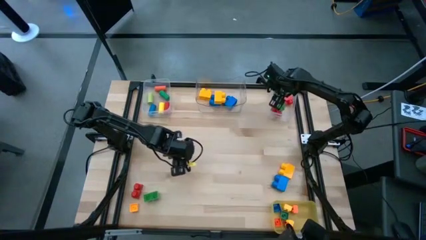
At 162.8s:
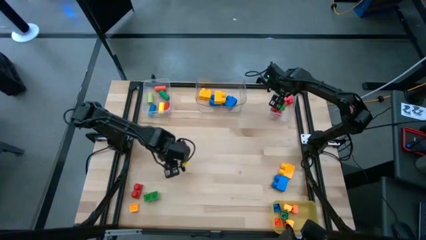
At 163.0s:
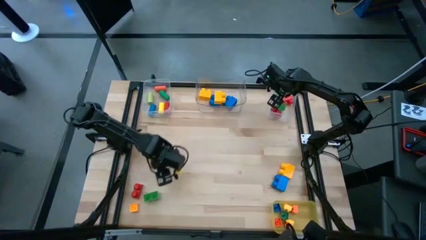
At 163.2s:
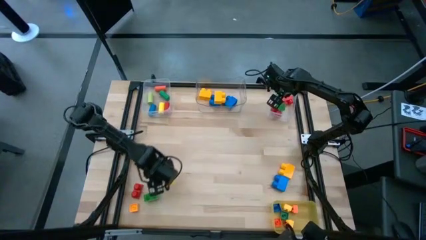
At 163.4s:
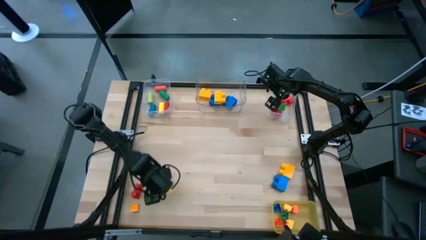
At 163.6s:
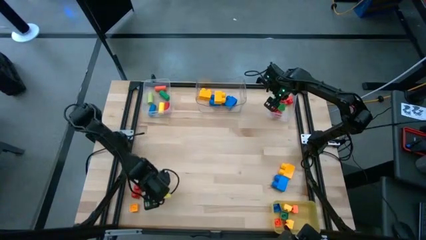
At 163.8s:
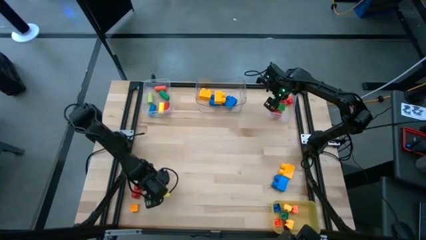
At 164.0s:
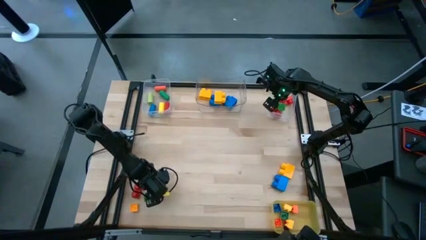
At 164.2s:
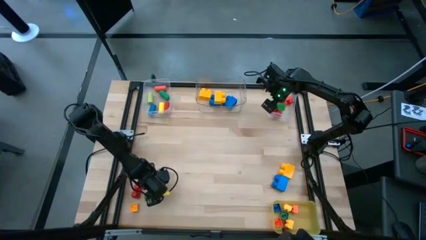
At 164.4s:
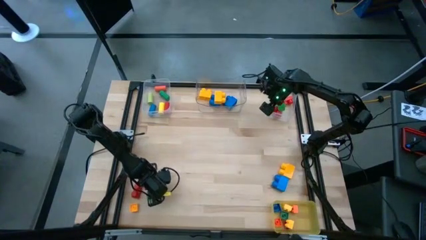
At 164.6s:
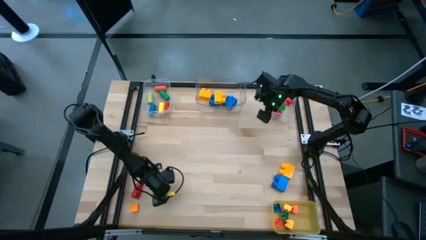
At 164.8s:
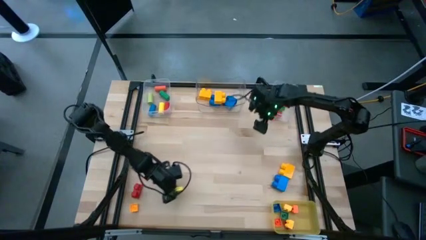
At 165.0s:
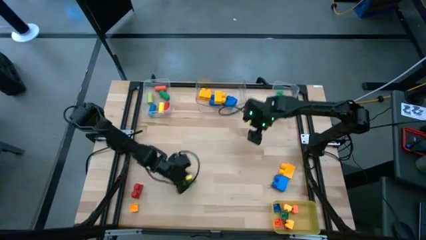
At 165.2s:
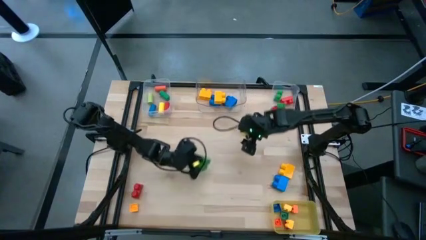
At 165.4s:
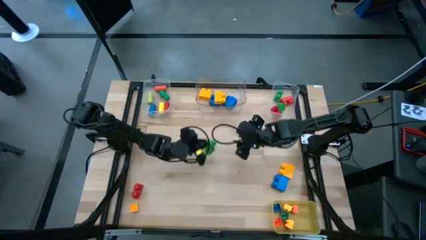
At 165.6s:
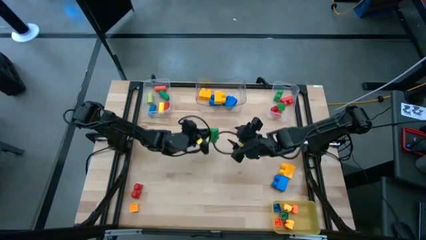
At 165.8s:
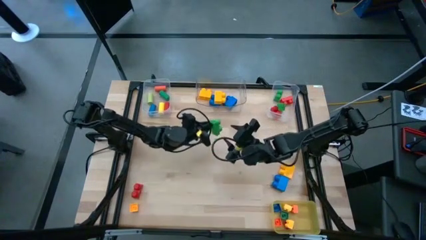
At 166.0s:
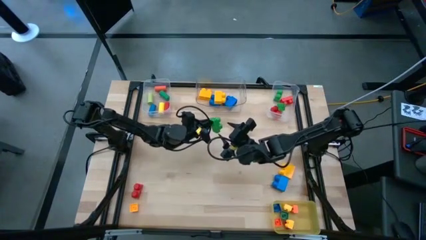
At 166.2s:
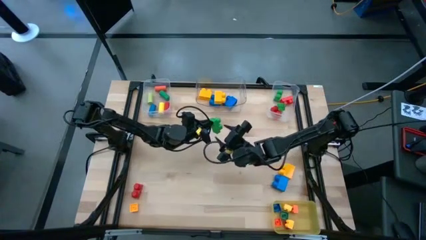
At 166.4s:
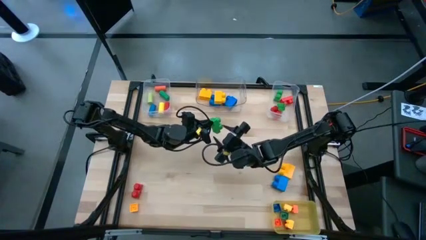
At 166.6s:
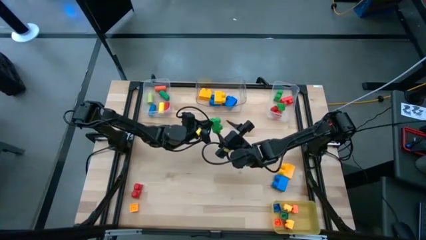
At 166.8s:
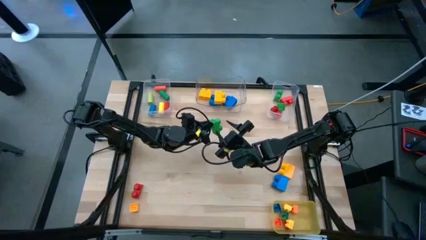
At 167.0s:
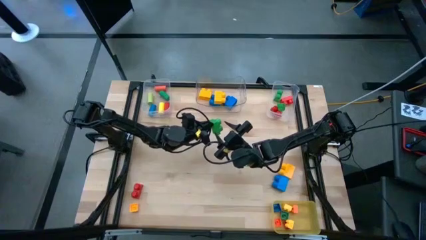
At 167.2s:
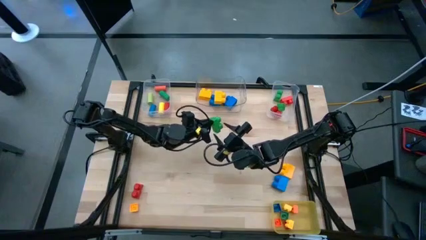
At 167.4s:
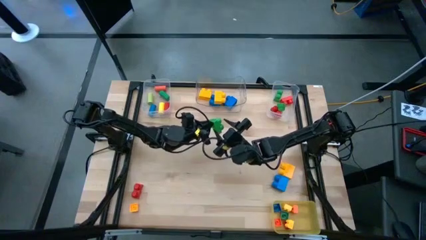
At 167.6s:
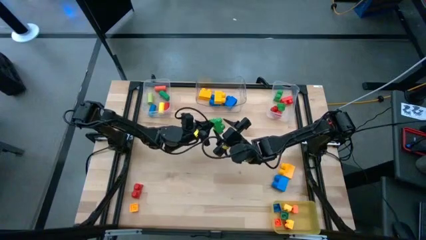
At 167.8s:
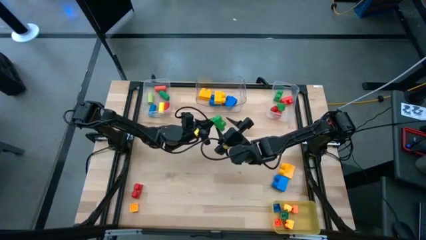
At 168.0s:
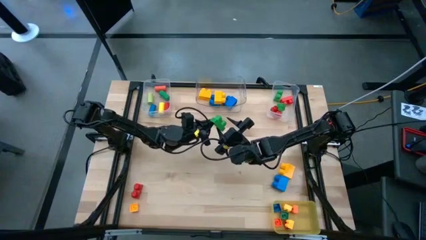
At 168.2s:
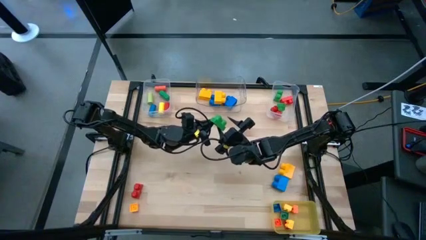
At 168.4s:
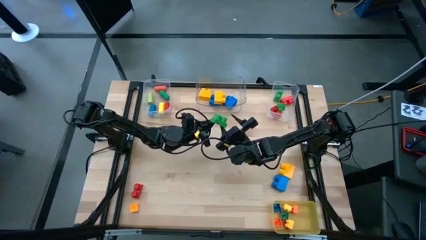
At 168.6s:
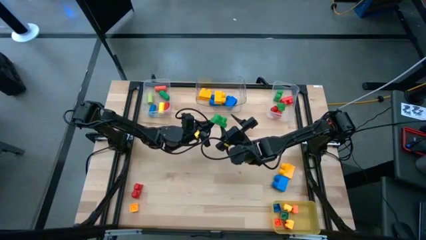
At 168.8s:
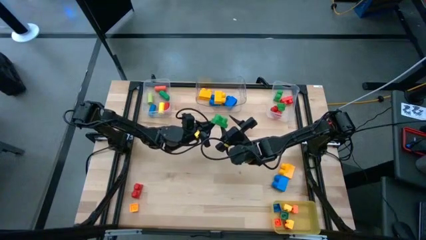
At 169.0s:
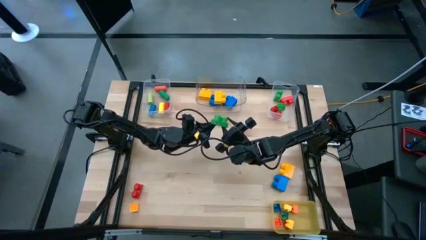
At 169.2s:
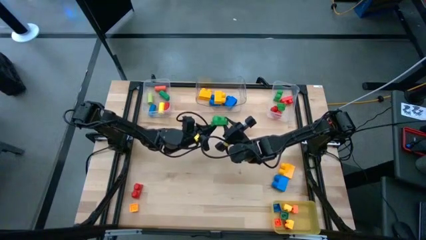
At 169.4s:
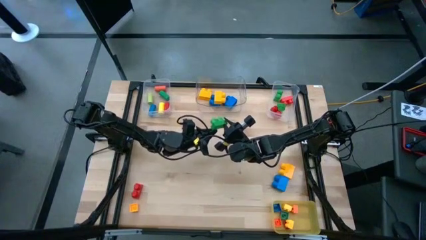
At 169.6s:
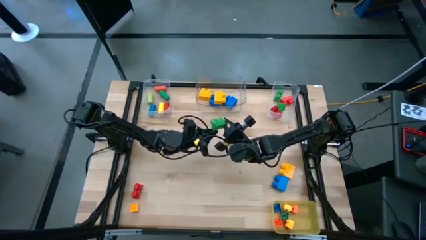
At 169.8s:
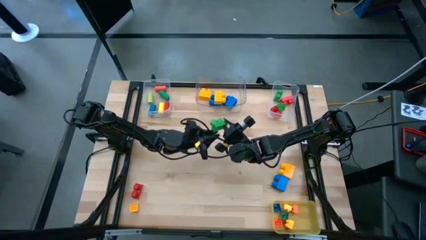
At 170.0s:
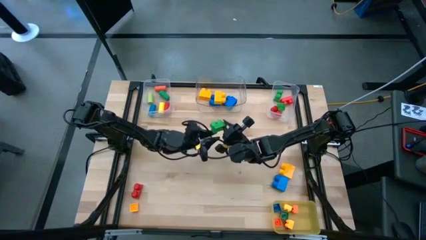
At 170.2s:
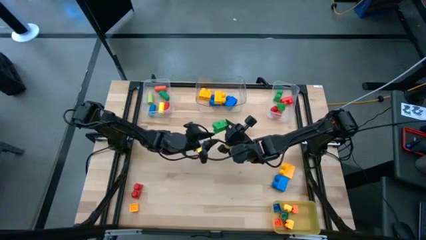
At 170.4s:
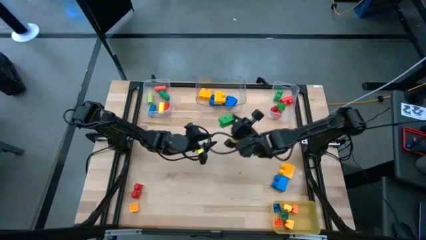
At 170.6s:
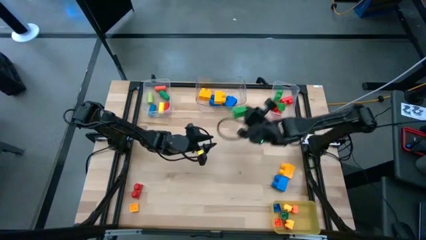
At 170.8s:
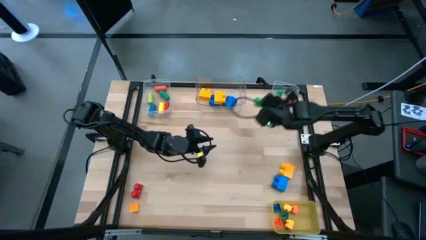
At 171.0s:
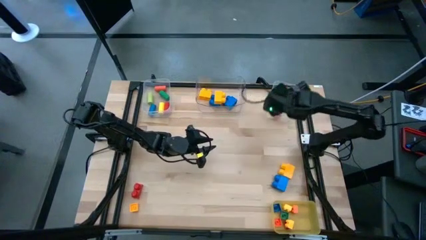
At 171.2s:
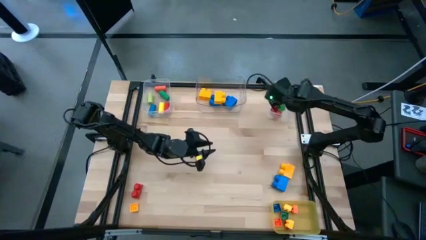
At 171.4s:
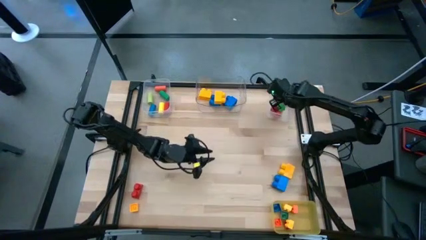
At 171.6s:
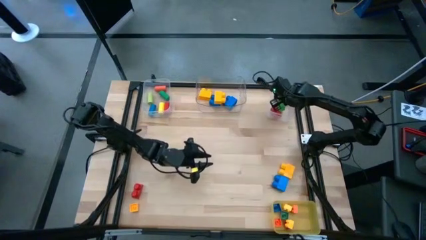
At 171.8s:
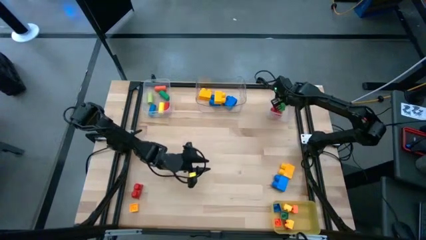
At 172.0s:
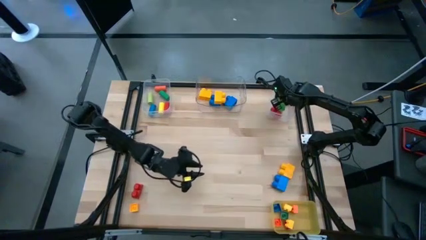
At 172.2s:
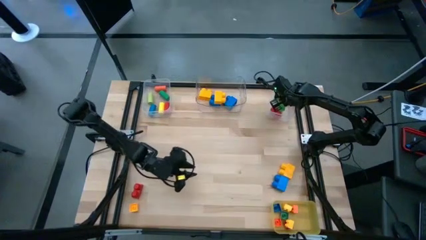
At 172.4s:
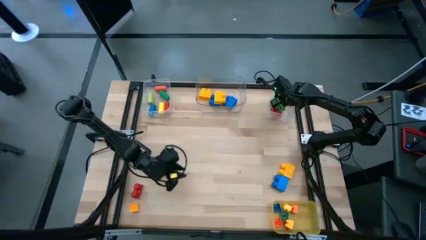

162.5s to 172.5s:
Task: Sort blocks by size
Put the medium green game piece into the right transparent bin

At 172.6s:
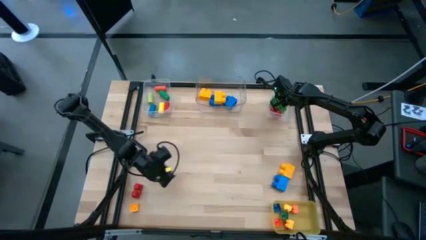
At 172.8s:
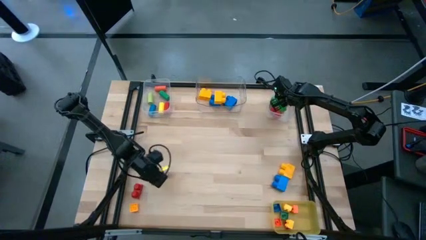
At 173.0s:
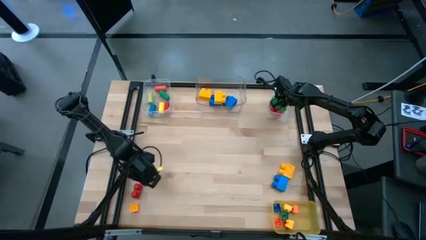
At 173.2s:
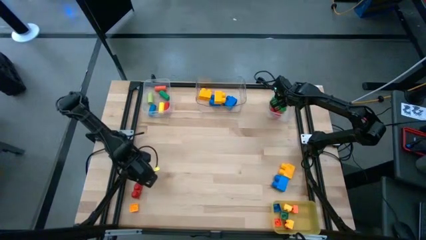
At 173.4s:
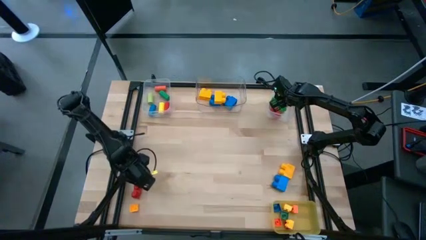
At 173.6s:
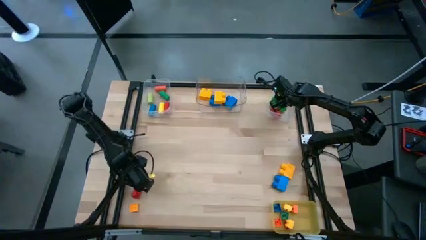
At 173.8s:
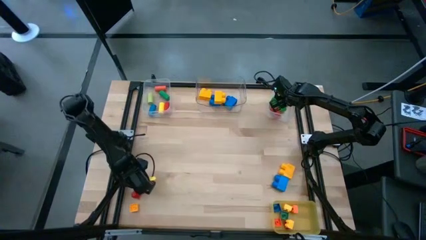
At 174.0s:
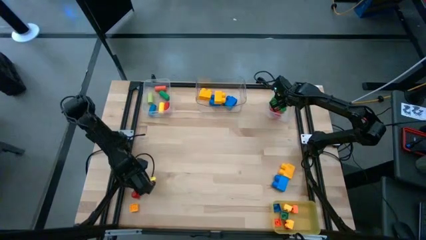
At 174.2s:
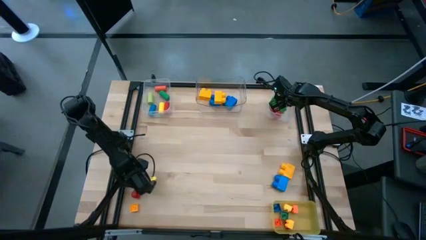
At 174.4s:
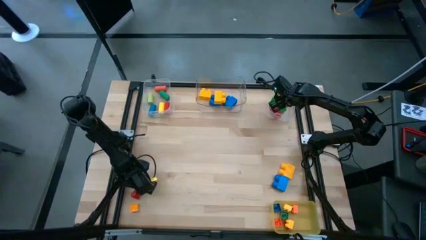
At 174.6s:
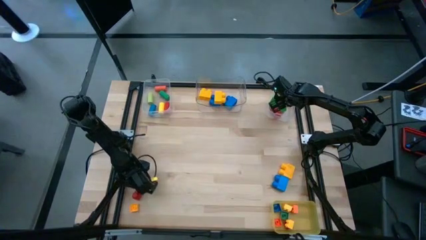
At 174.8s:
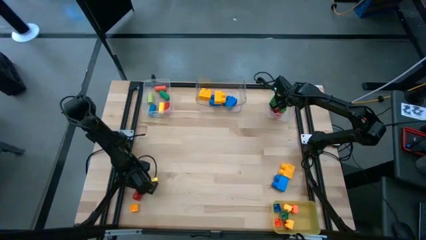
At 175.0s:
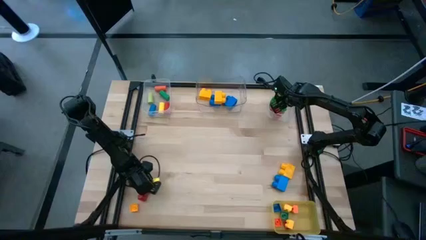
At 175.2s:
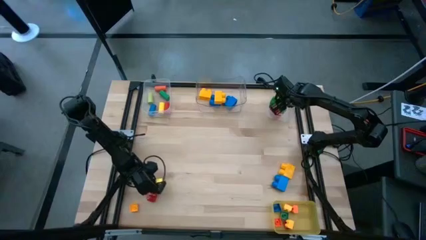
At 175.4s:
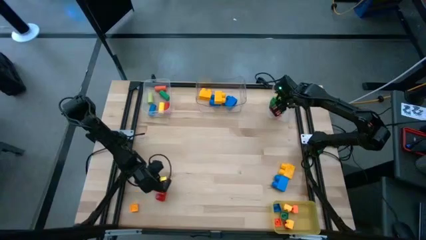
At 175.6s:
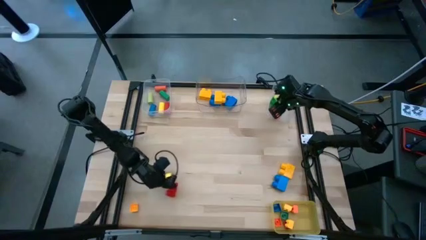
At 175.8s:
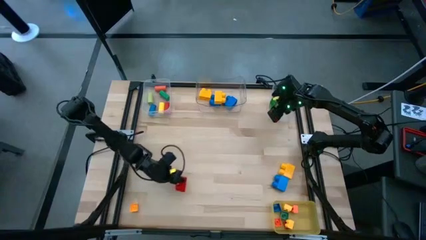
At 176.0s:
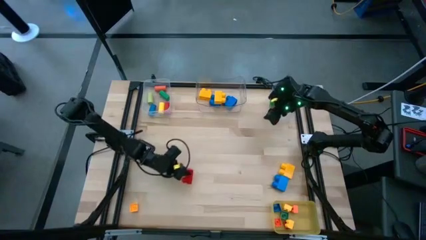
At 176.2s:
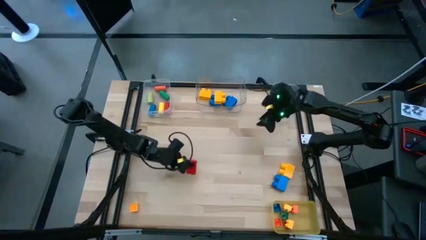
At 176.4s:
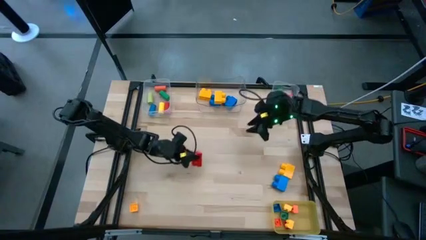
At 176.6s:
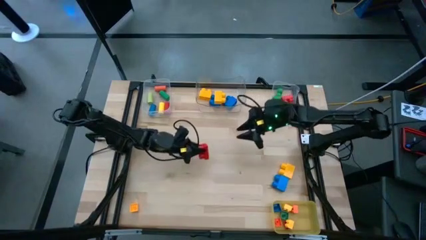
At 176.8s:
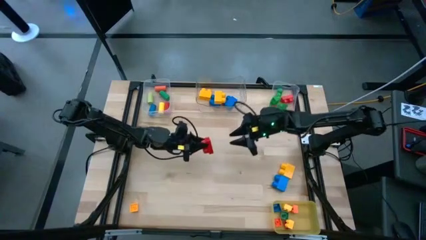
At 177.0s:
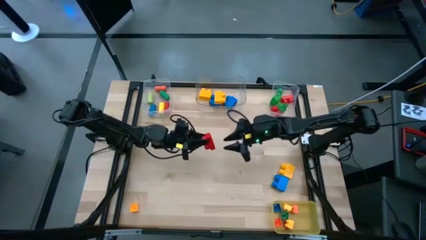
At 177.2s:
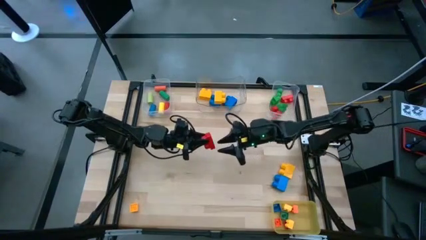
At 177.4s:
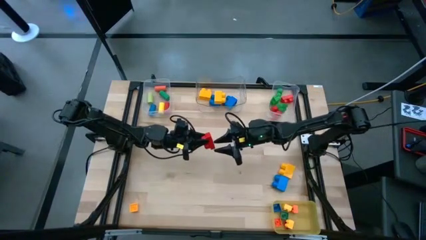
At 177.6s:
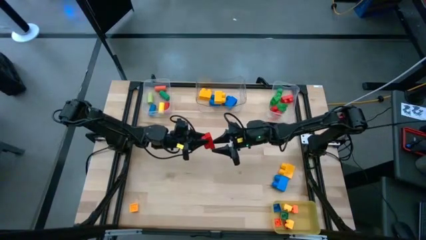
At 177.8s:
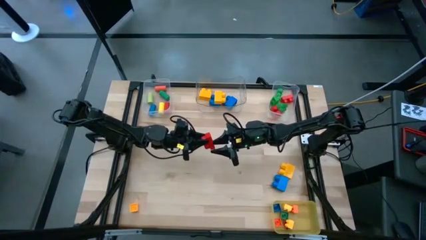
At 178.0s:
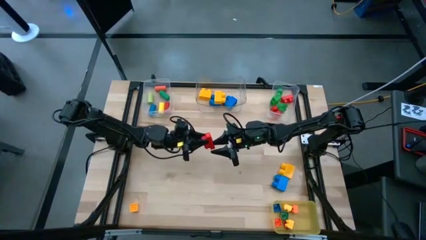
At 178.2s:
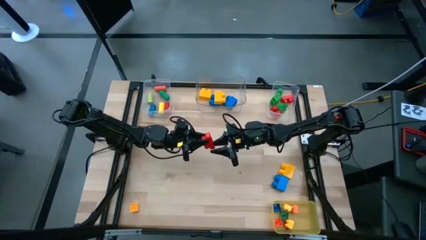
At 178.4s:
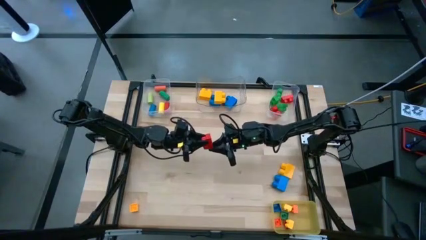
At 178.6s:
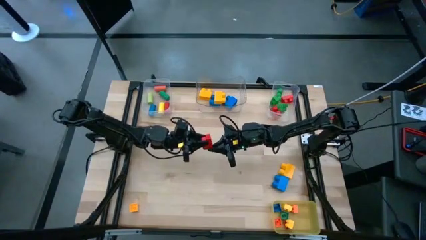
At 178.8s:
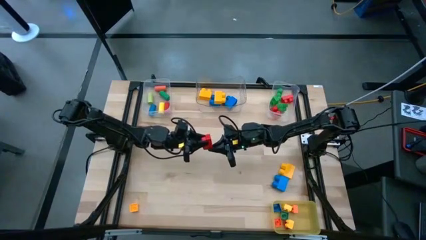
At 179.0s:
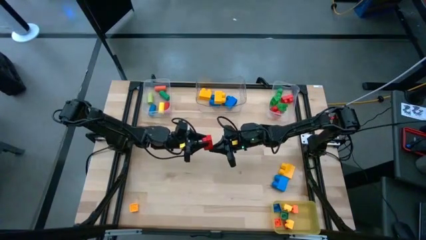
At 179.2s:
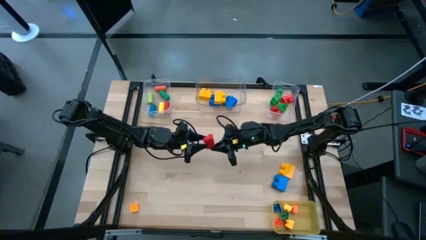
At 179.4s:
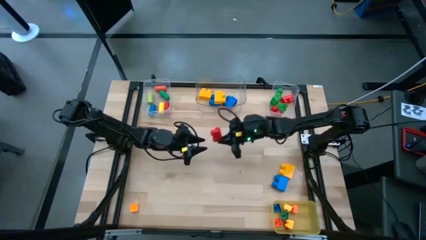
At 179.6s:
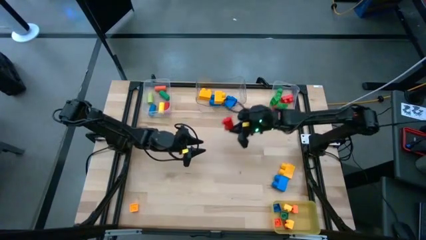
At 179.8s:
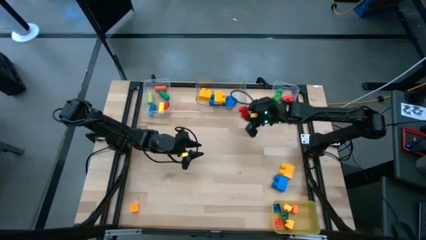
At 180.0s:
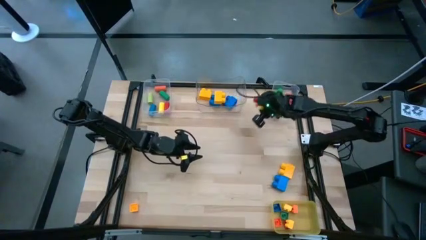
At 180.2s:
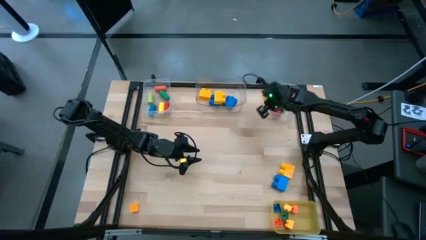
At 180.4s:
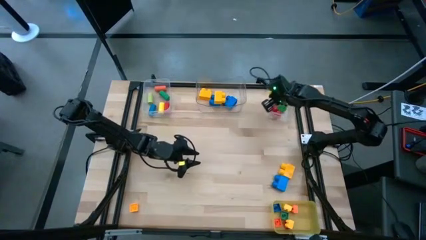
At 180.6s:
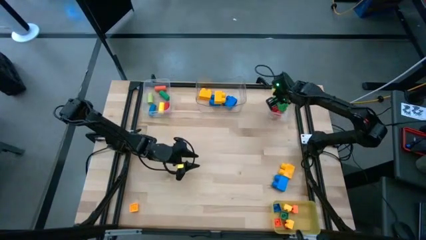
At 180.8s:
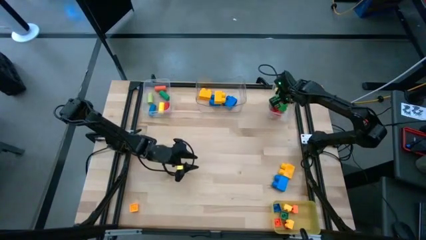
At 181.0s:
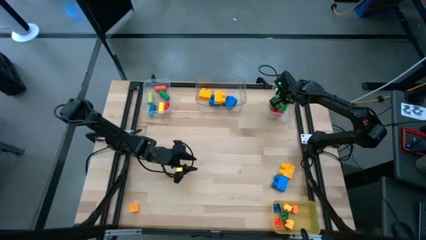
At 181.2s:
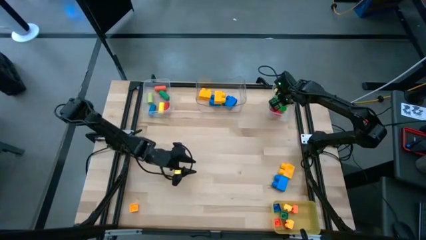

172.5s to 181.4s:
Put the medium red game piece into the right transparent bin
